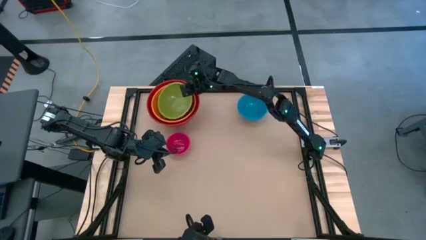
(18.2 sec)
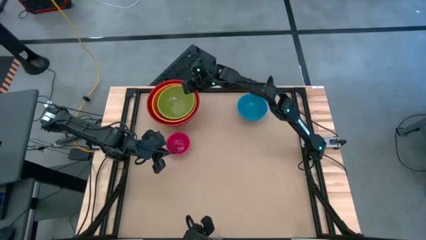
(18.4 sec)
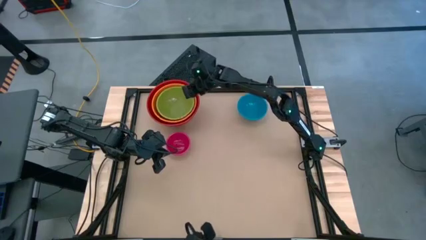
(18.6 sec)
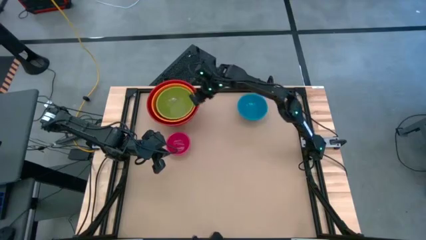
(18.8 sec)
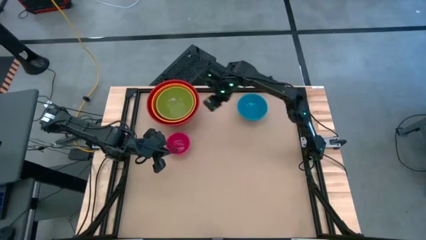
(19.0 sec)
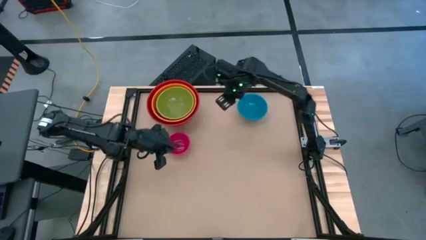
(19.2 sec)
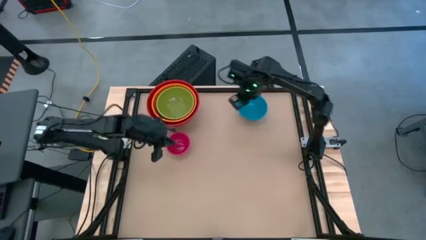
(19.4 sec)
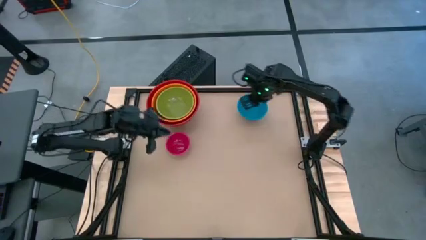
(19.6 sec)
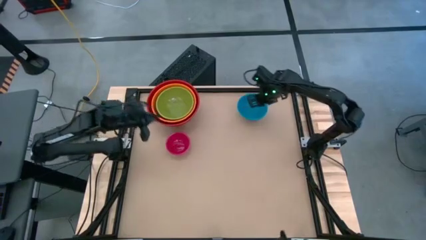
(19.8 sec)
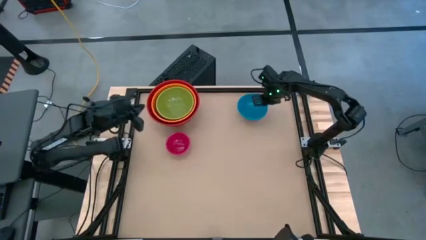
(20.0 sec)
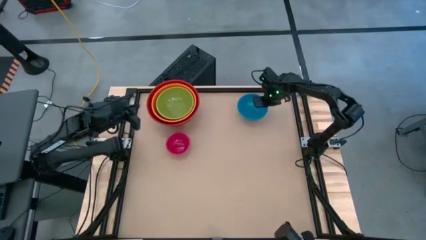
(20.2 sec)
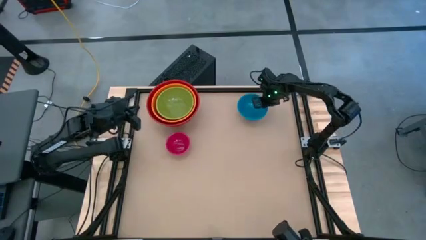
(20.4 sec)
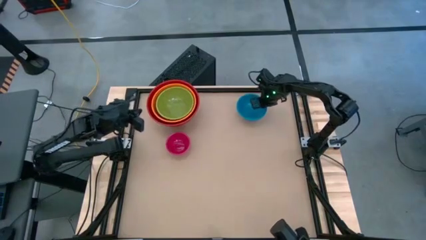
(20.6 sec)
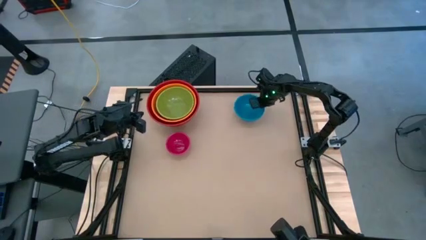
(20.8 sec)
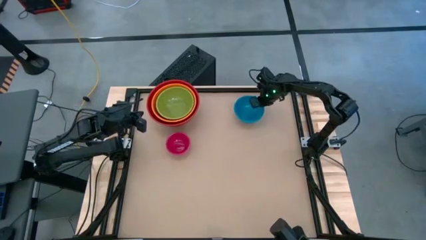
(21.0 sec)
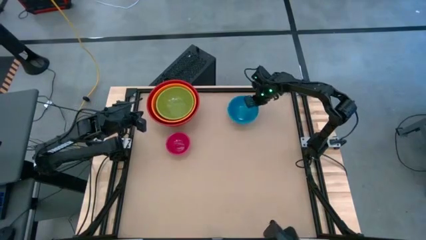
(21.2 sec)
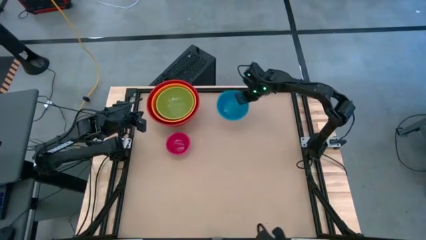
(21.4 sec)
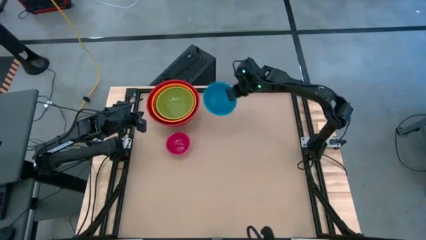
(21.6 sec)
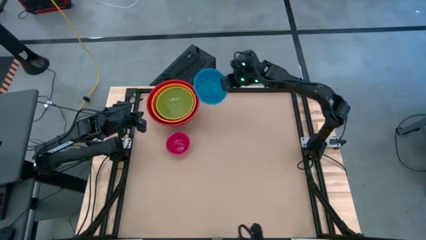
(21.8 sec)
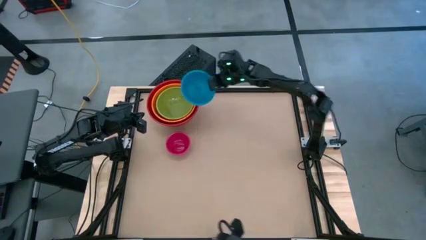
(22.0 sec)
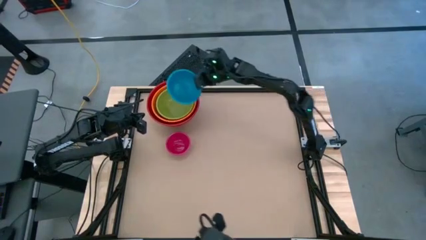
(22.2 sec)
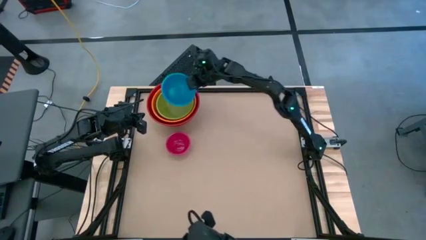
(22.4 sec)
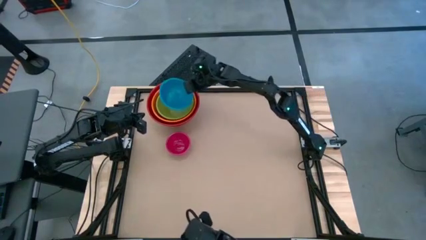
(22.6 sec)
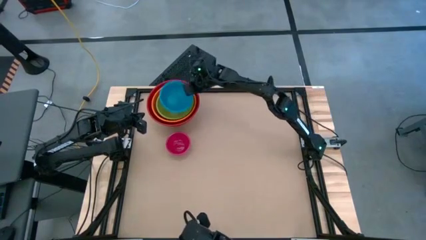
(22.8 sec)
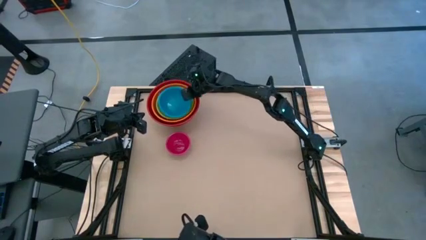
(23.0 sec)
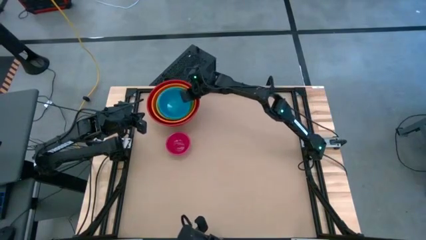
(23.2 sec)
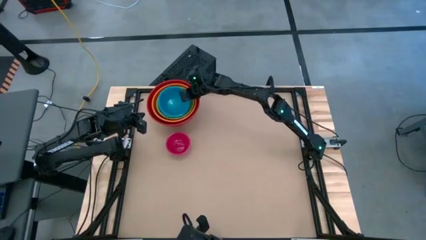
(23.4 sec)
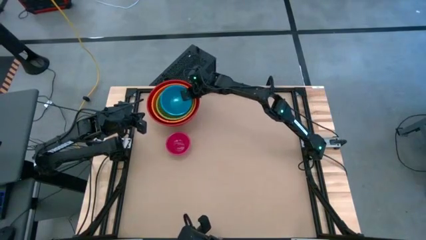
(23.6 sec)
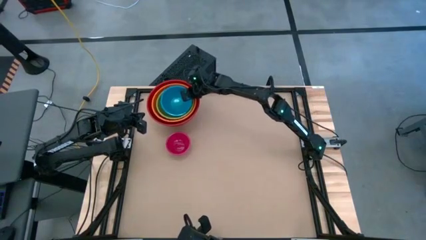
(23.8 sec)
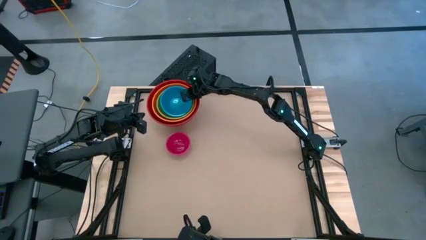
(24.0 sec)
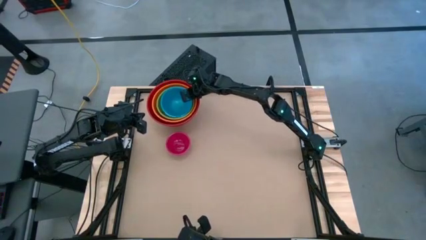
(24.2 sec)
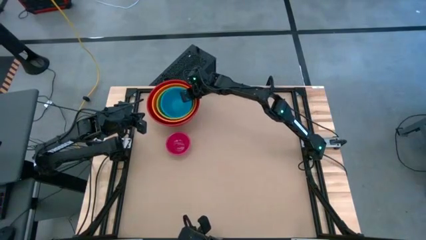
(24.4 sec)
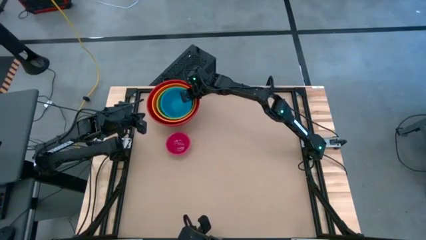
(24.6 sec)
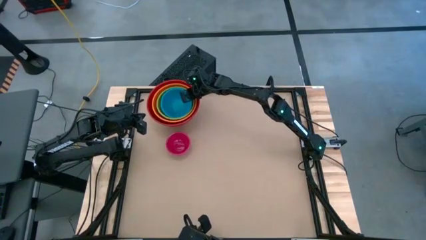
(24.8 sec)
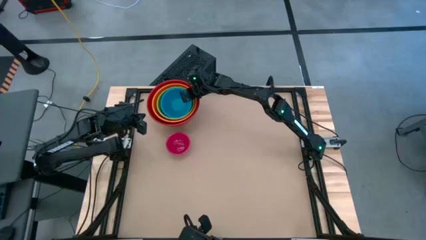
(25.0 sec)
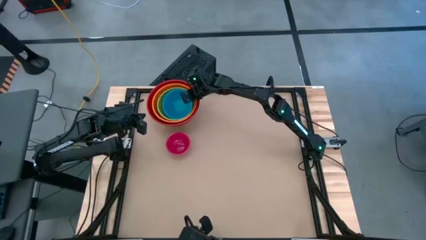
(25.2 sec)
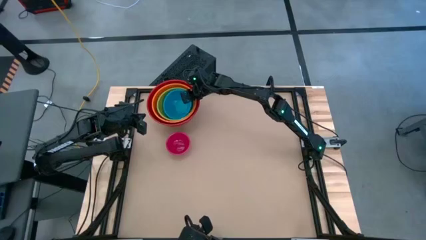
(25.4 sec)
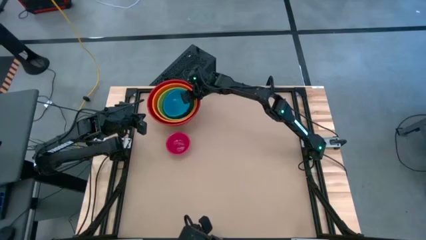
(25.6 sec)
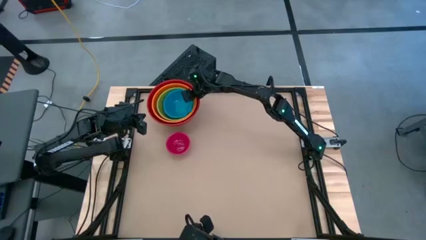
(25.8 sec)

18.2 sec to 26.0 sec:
Stack the blue bowl on top of the green bowl

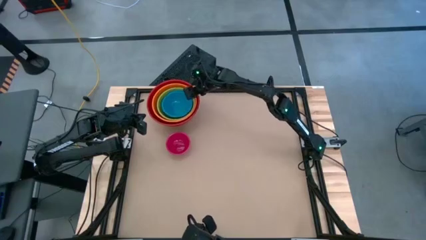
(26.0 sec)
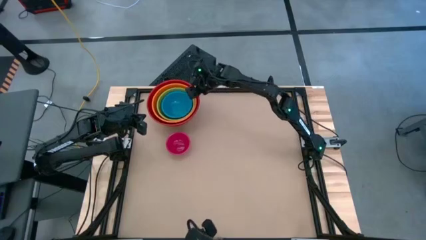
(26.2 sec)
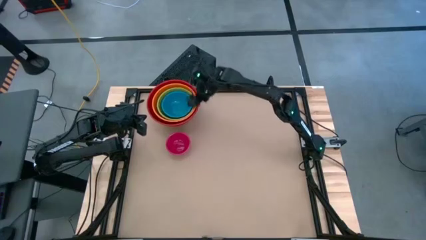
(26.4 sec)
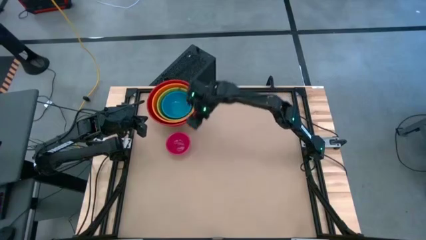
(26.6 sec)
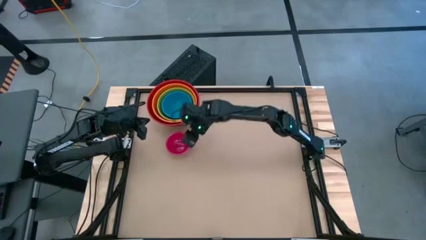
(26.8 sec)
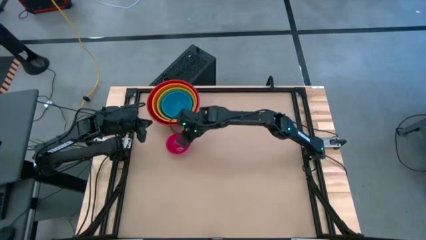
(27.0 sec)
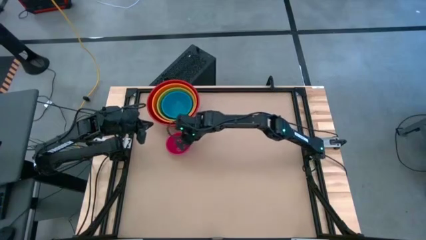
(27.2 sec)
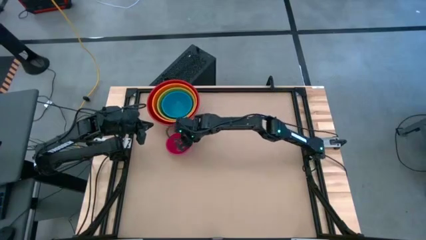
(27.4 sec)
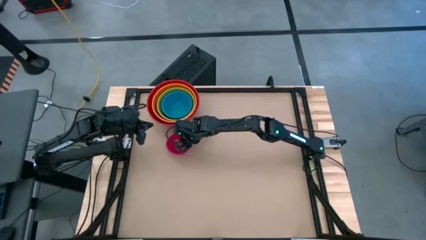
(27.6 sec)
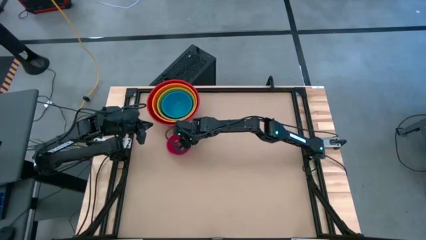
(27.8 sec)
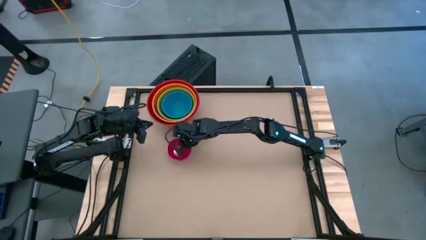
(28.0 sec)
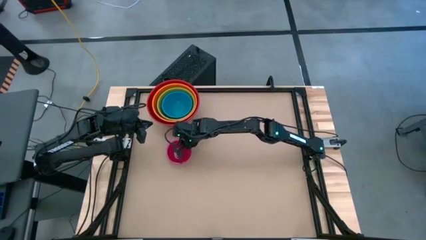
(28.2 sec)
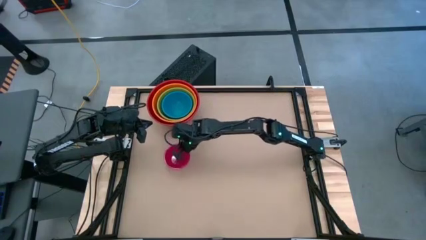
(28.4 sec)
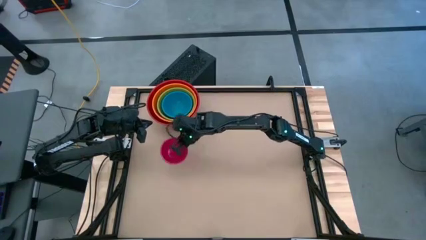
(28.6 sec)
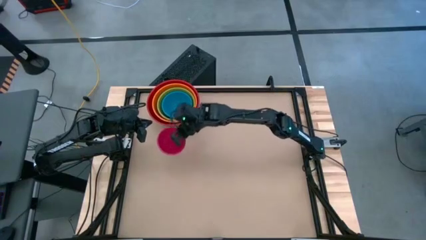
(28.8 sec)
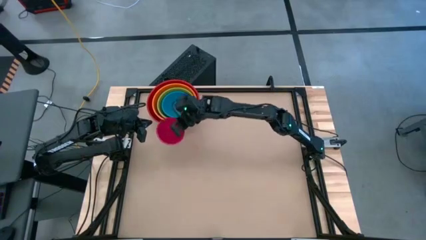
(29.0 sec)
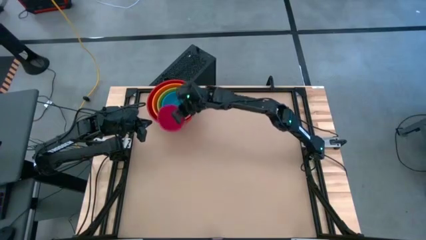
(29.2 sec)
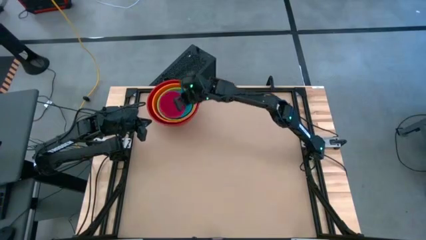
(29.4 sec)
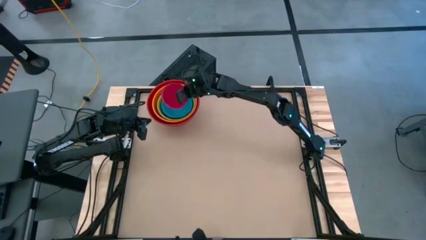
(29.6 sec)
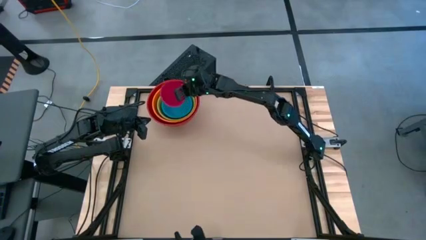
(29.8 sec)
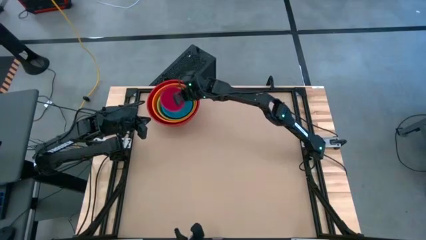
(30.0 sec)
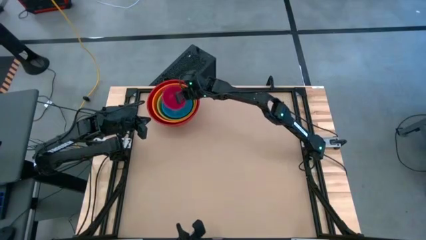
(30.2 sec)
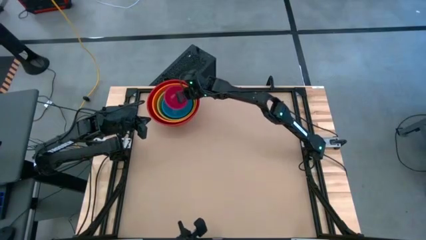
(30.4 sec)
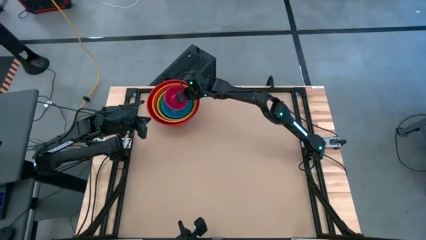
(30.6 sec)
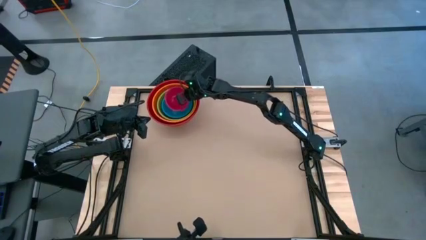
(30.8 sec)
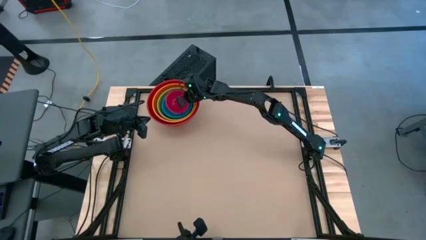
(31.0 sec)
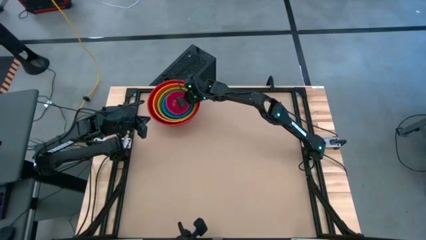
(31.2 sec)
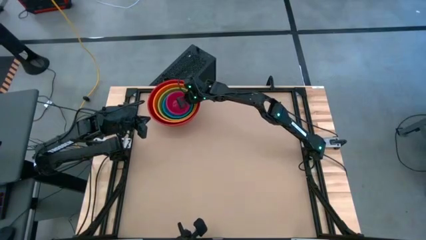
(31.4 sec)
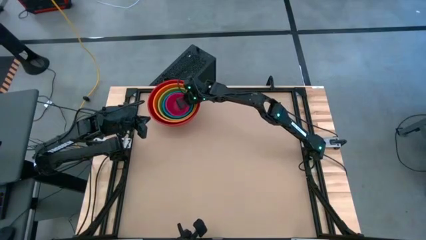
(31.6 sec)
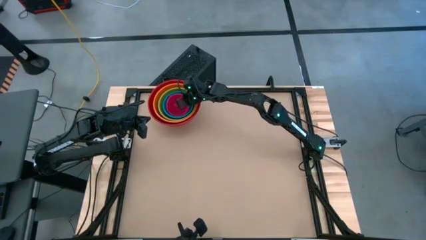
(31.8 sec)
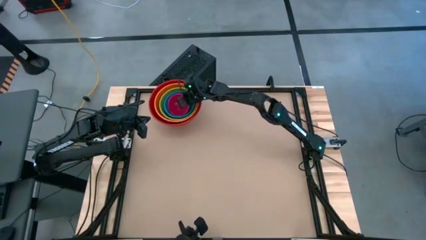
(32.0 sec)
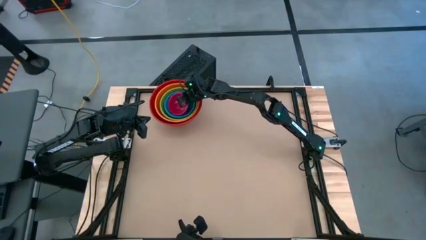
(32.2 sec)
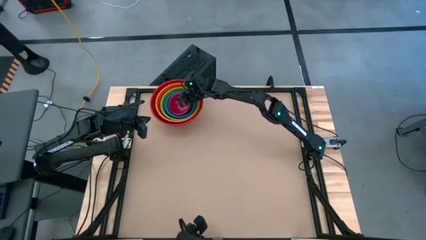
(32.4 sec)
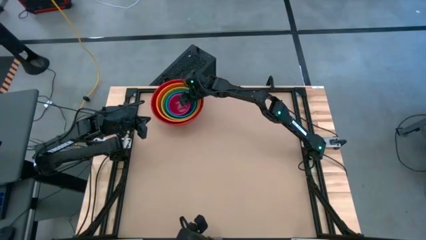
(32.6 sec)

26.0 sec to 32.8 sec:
Stack the pink bowl on top of the blue bowl
